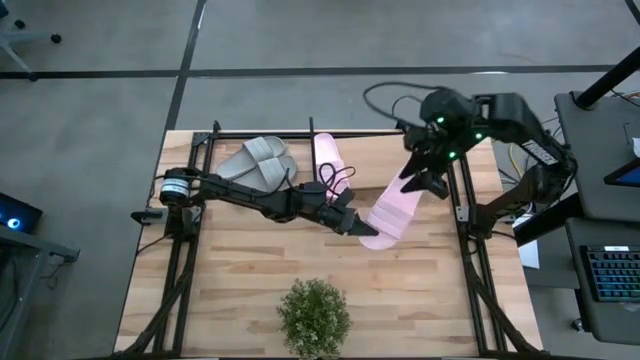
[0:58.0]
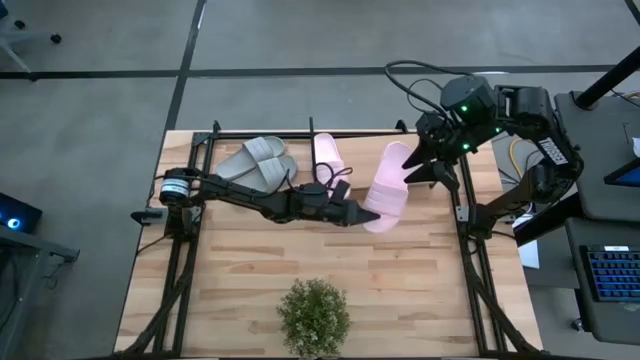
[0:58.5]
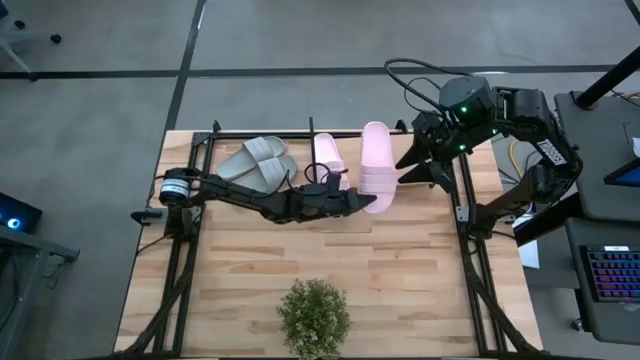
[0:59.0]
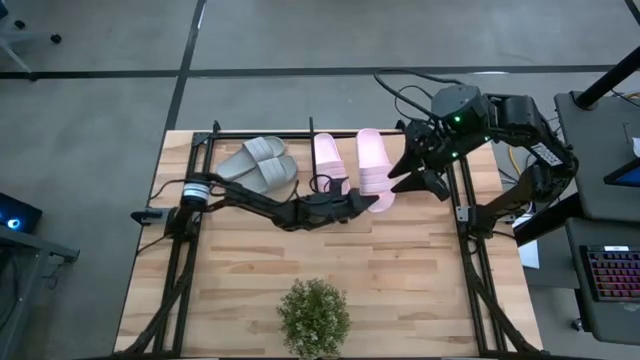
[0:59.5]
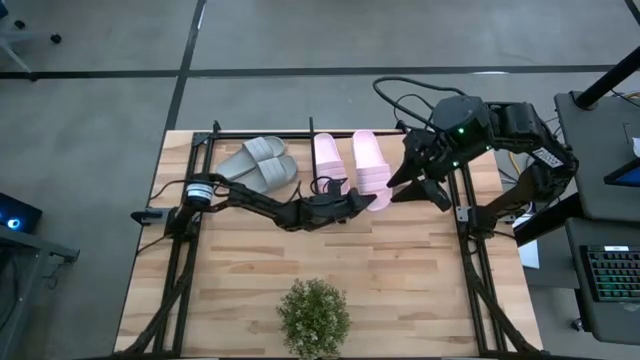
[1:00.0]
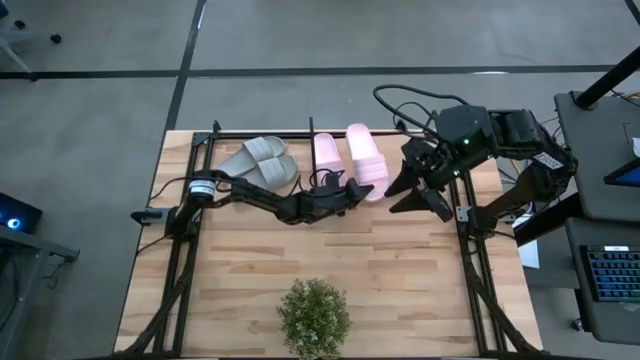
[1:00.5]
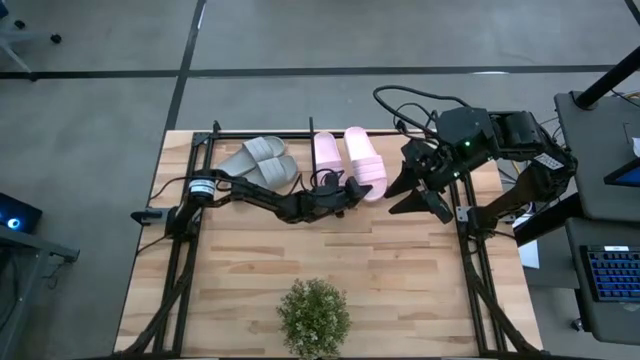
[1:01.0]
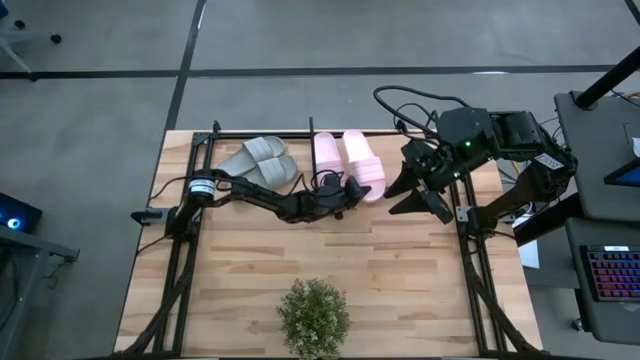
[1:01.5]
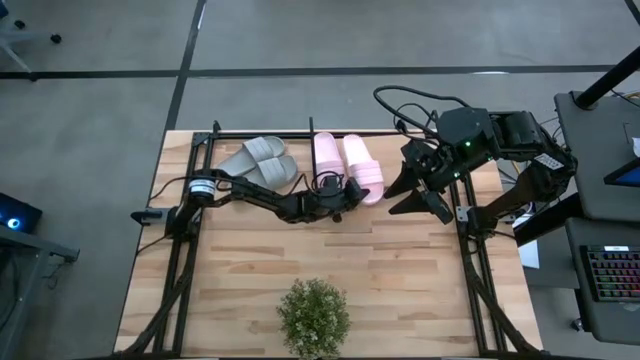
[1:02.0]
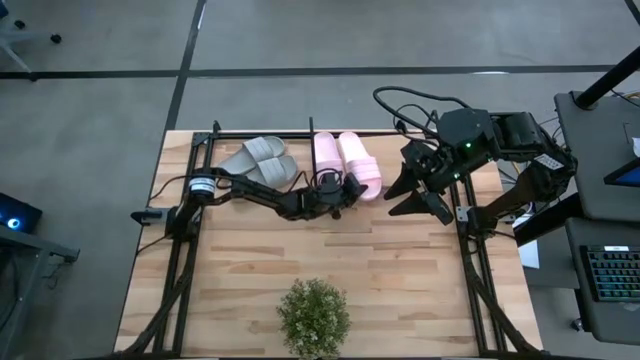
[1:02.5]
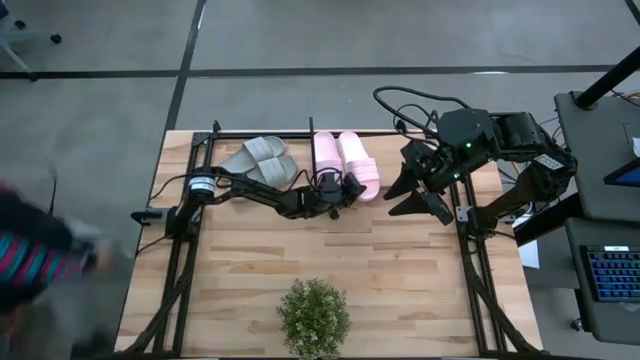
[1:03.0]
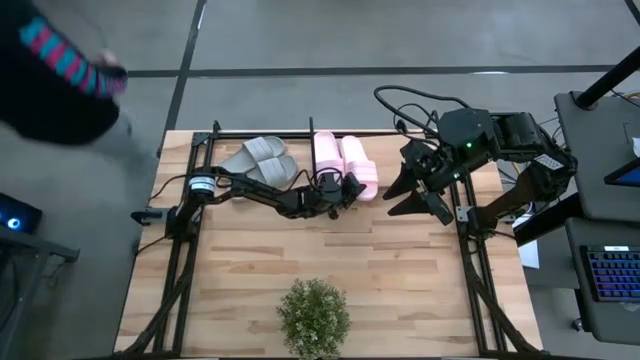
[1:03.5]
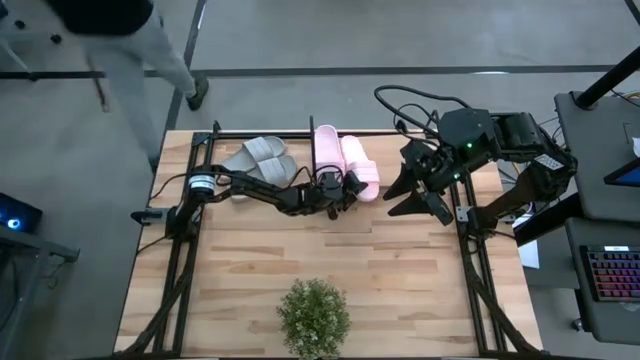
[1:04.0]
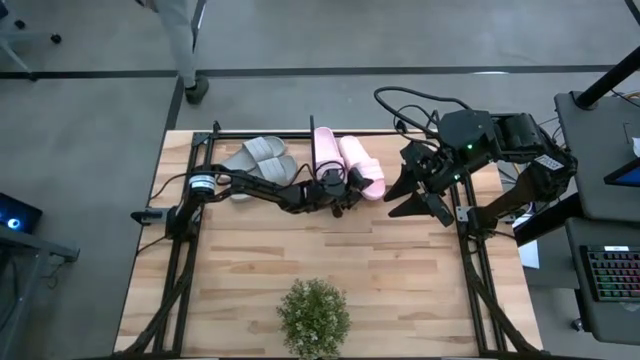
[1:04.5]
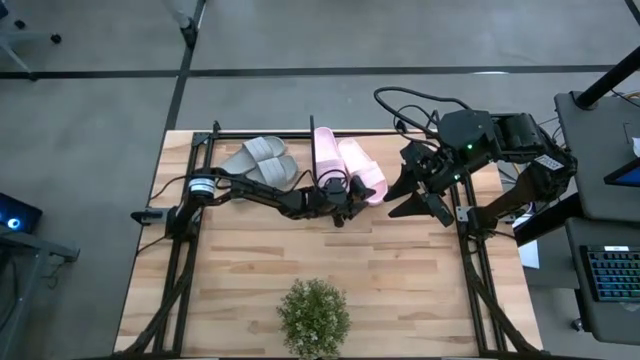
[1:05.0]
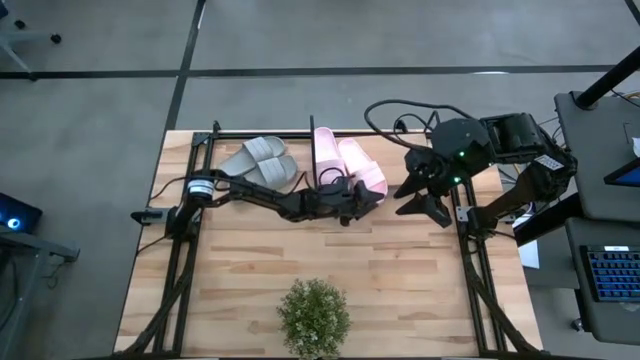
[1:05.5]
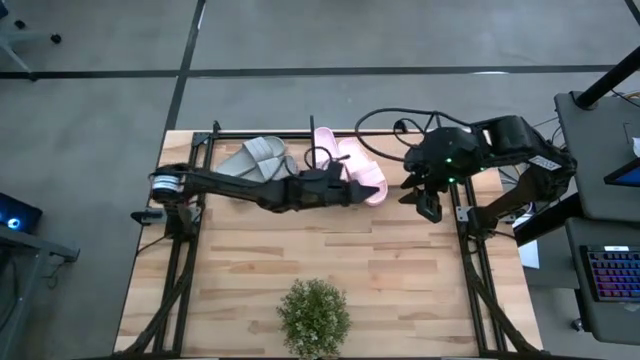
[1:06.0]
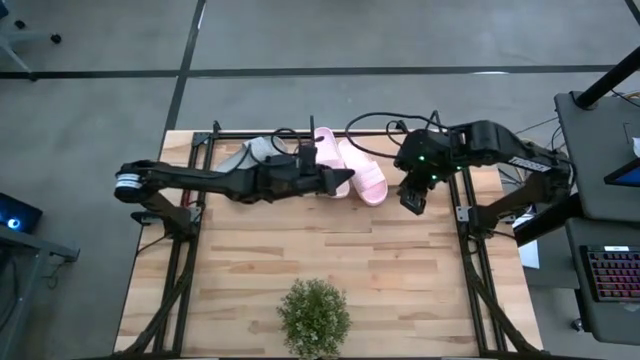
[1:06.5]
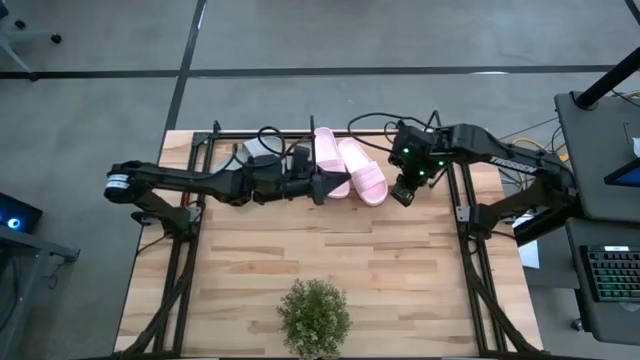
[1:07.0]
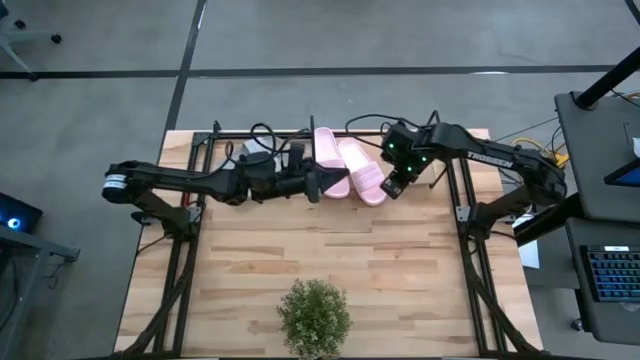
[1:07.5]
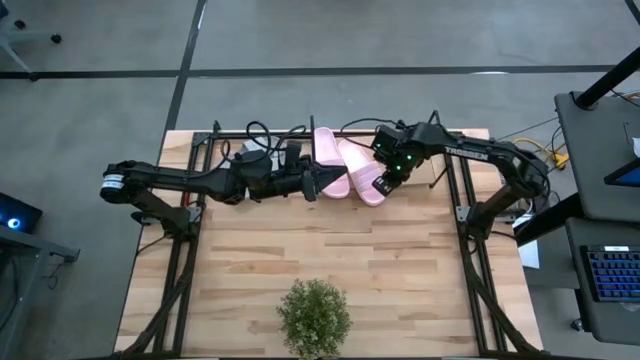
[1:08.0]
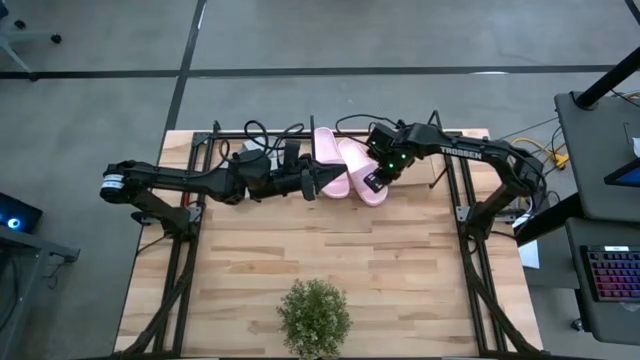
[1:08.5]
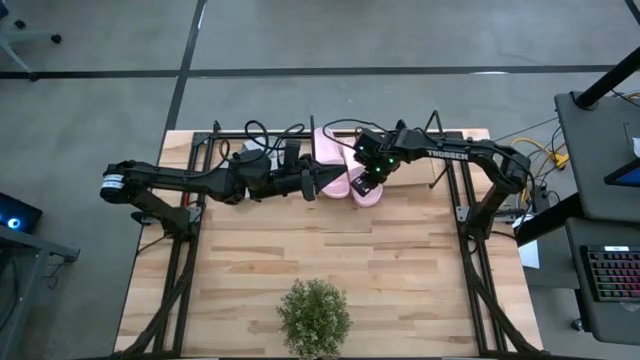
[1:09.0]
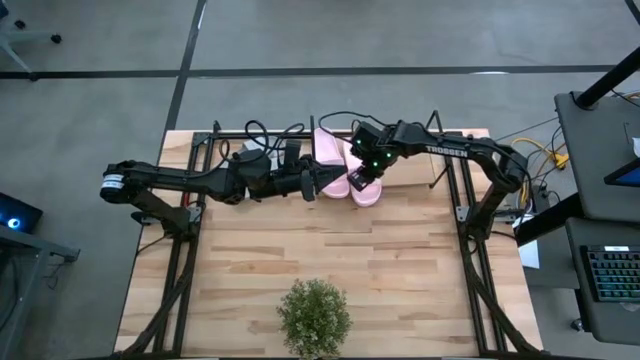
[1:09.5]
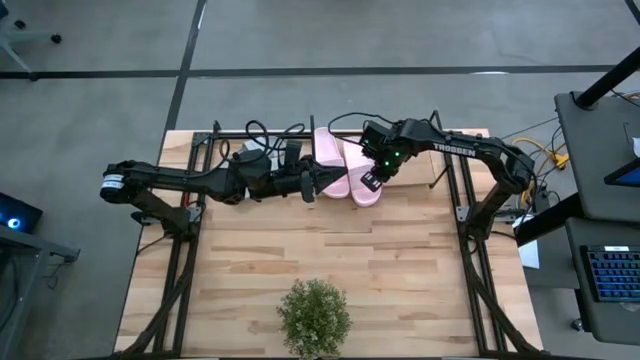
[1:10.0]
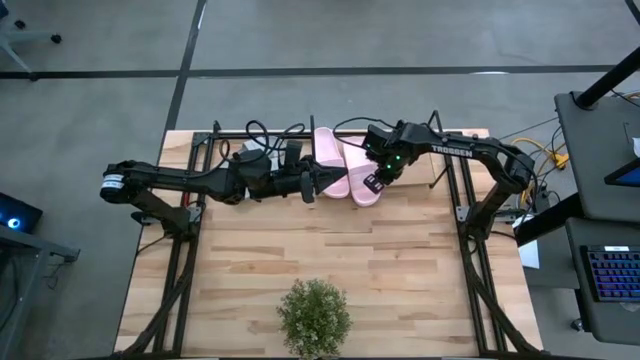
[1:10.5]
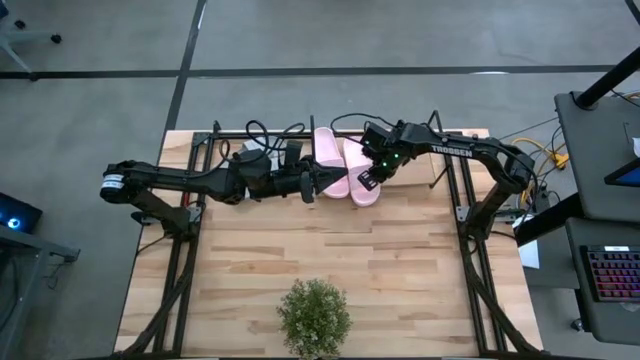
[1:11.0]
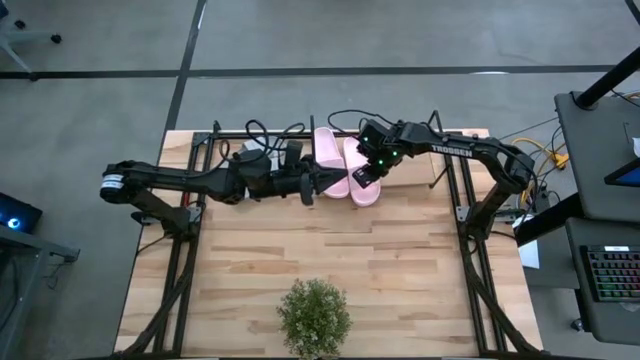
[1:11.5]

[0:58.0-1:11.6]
Task: Pick and place slides into the shelf
Put the pink slipper on the shelf

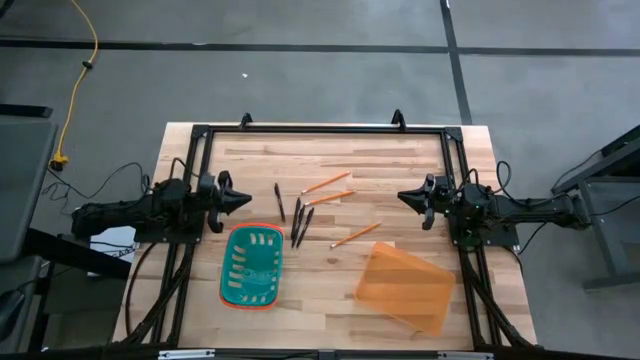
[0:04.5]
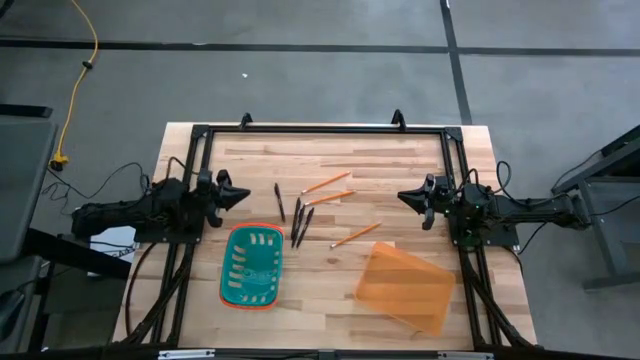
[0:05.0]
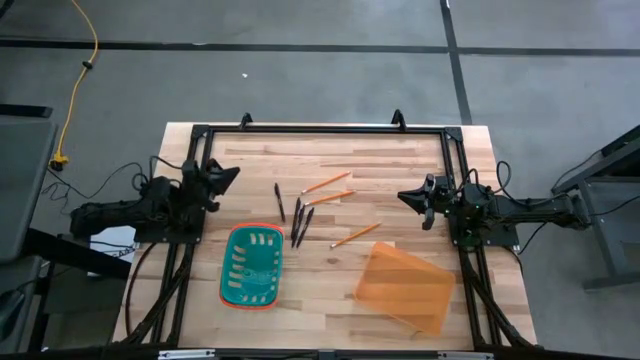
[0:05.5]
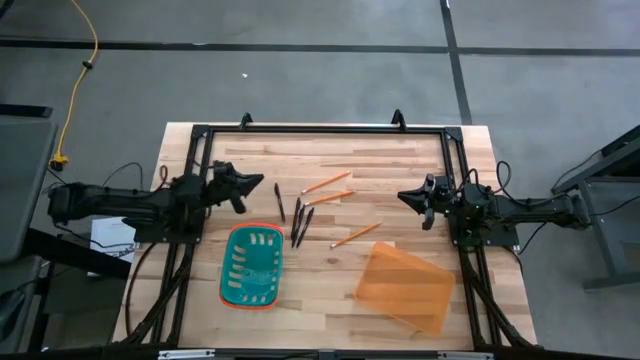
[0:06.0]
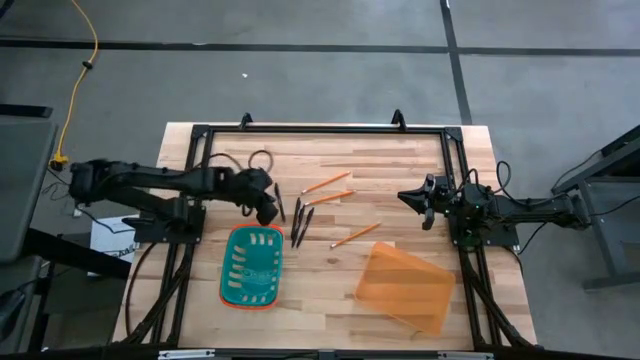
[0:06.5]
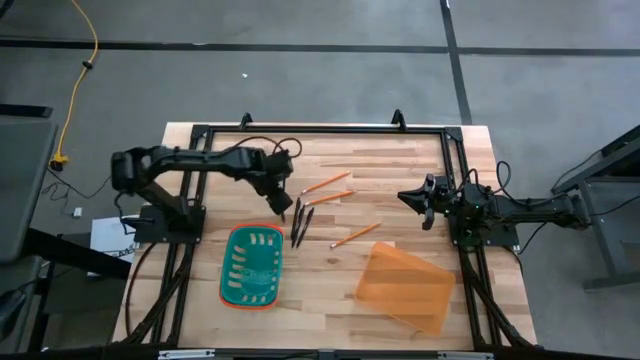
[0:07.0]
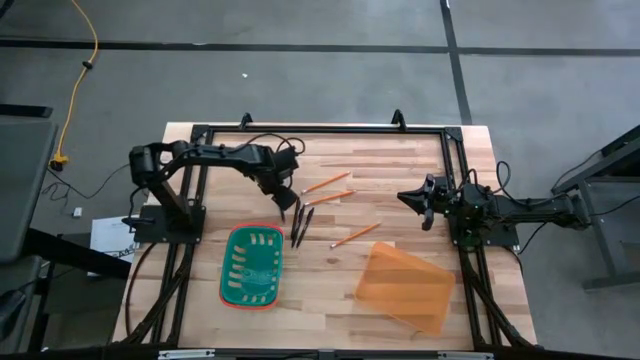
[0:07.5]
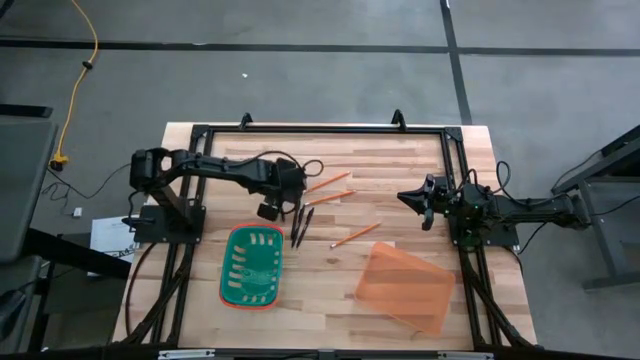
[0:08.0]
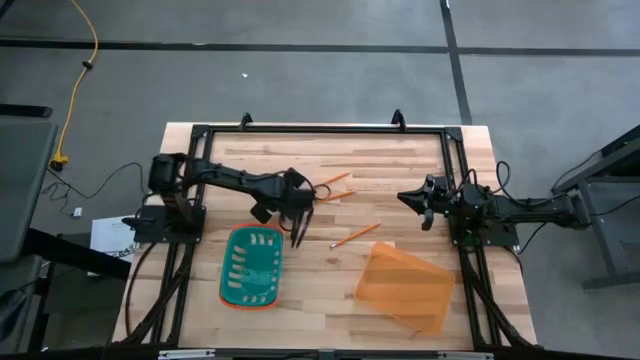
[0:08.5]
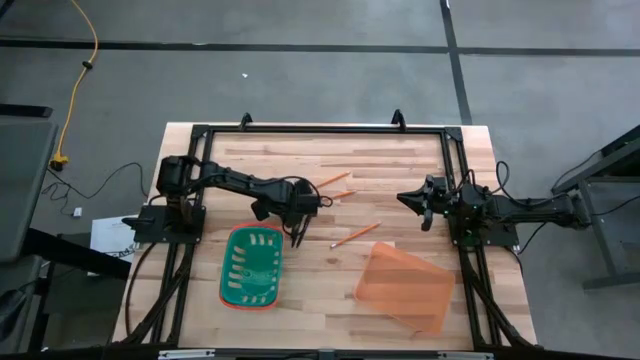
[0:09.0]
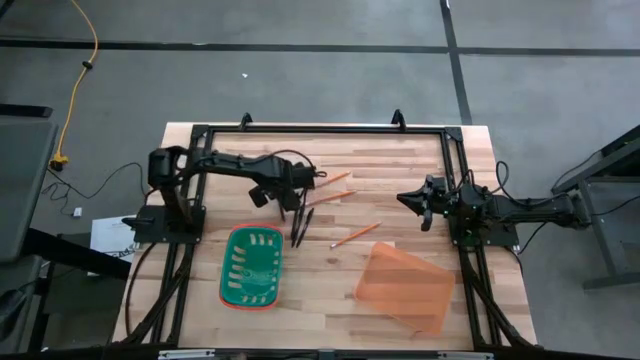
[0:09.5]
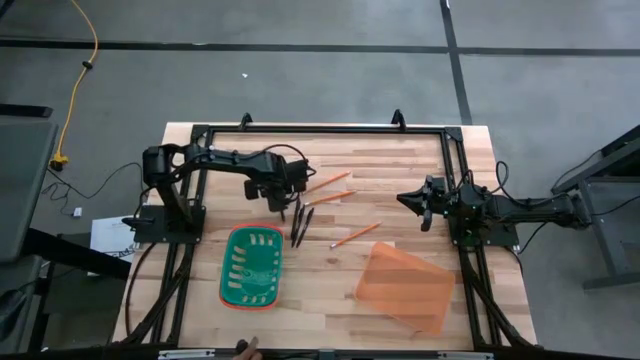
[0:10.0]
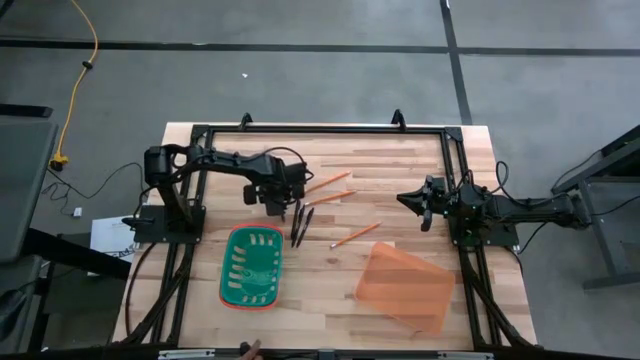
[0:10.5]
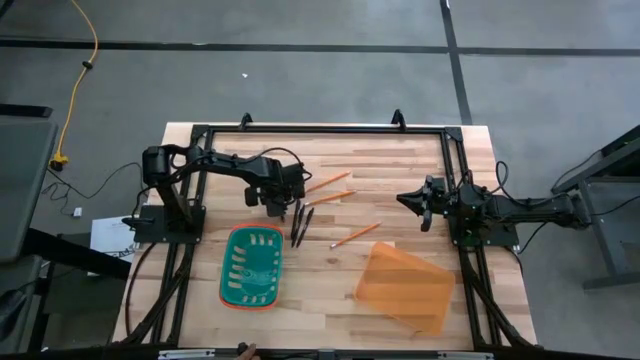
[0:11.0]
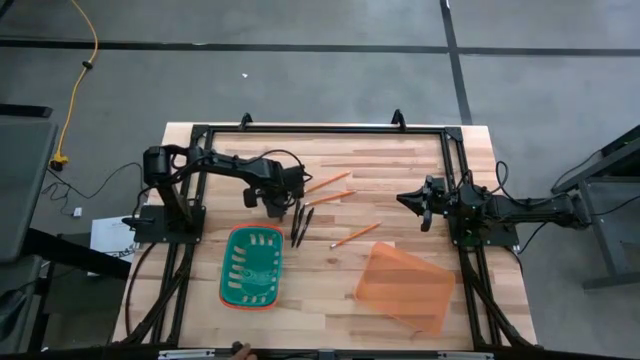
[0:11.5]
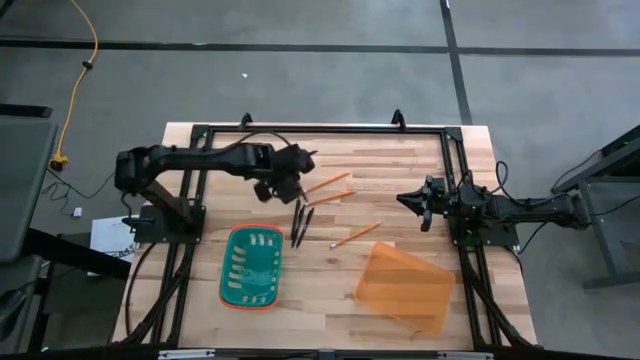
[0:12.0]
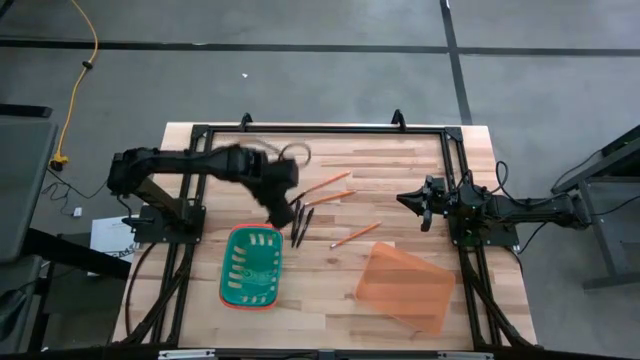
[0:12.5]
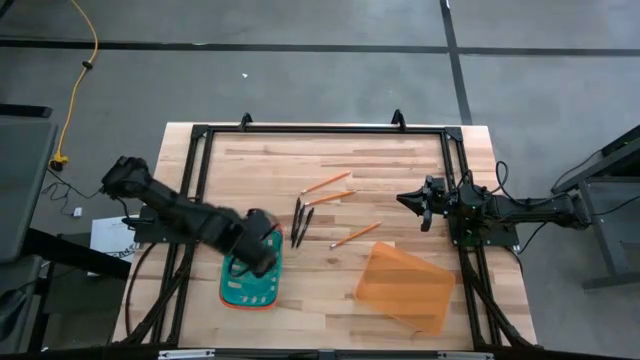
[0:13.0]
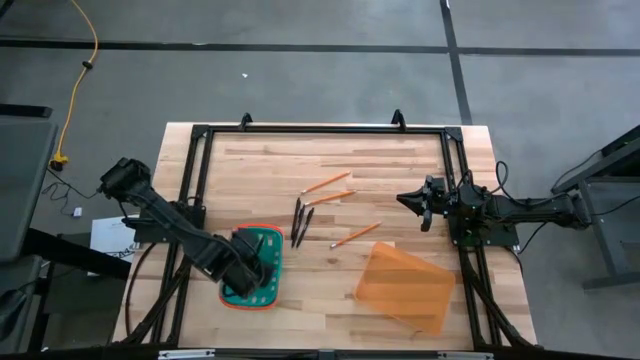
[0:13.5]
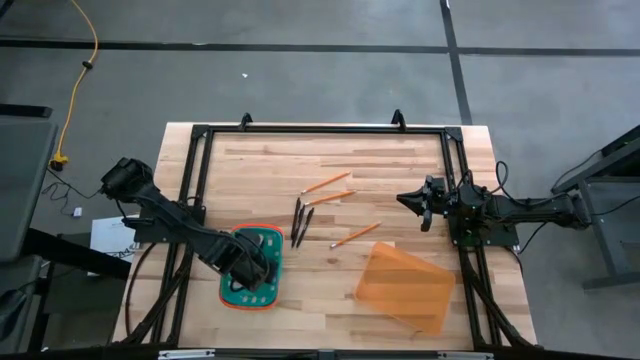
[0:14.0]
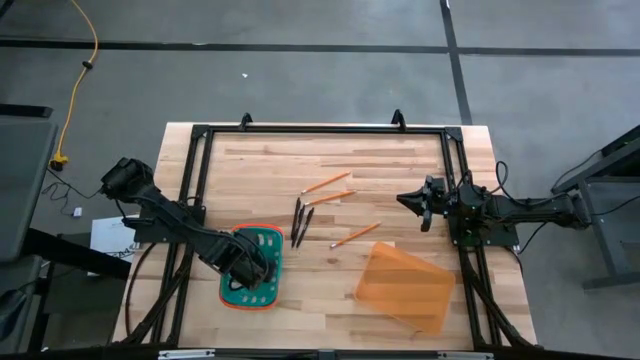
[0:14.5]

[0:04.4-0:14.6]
Task: Sort pens & pencils
Put the black pen into the green bin
